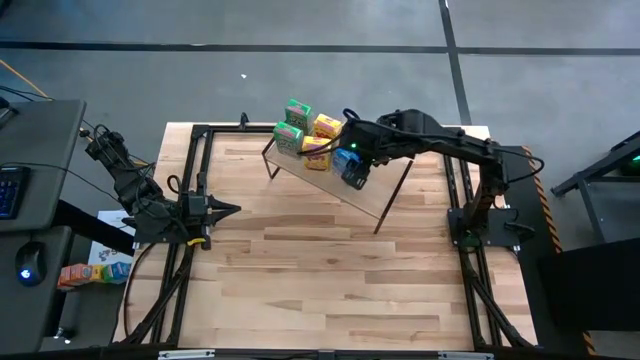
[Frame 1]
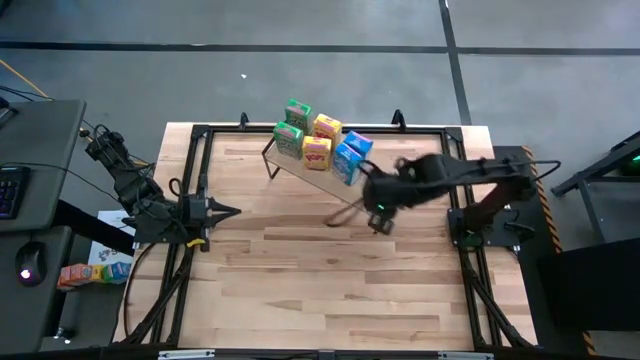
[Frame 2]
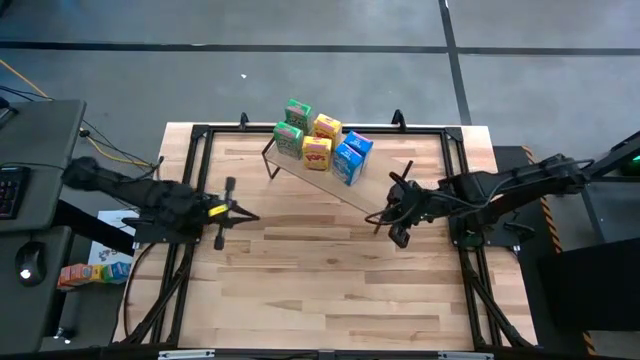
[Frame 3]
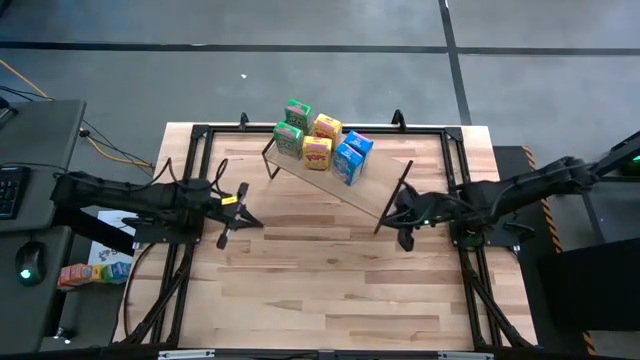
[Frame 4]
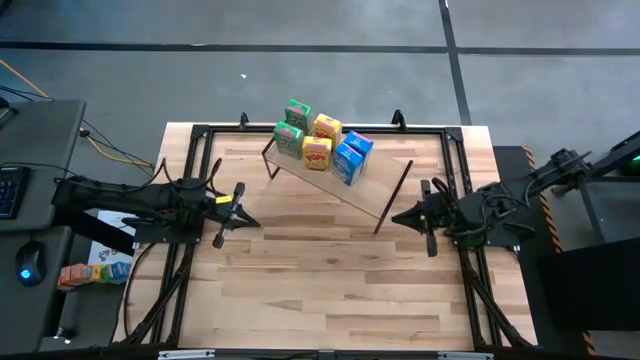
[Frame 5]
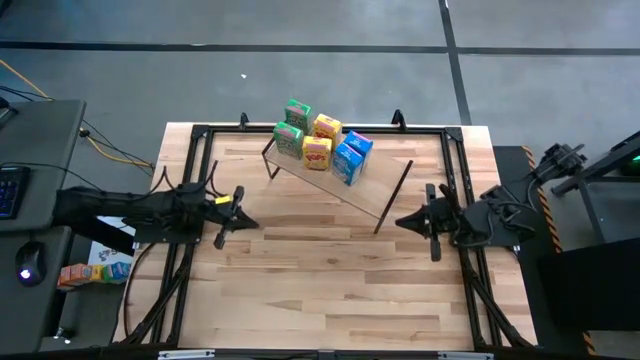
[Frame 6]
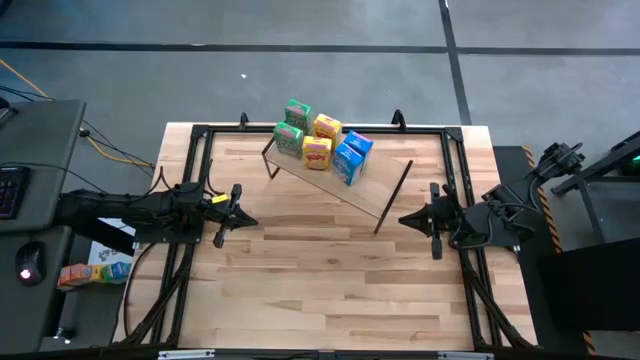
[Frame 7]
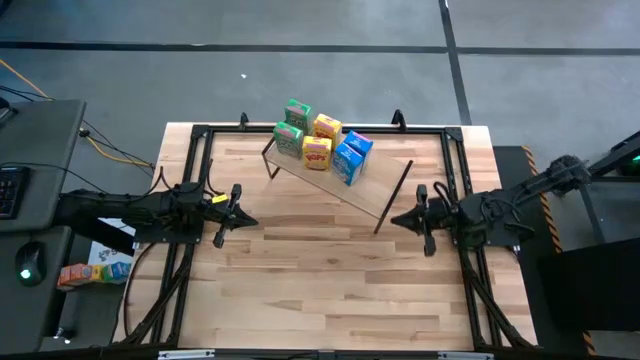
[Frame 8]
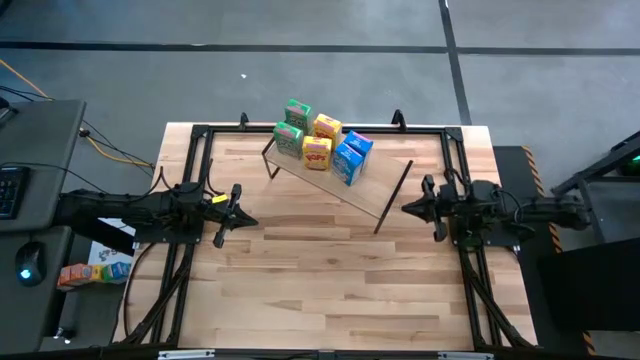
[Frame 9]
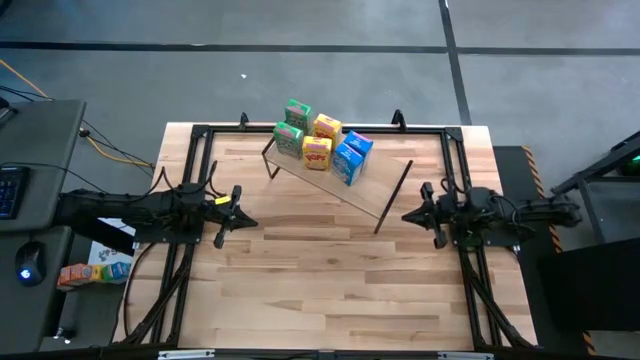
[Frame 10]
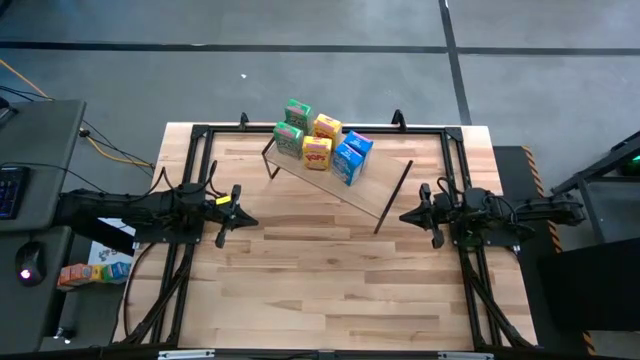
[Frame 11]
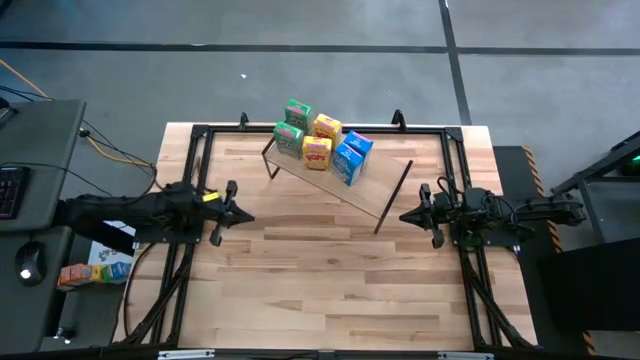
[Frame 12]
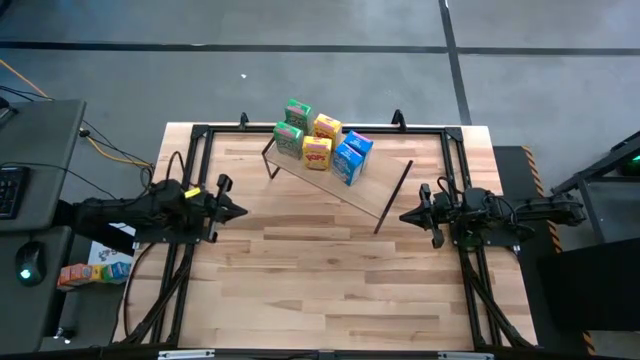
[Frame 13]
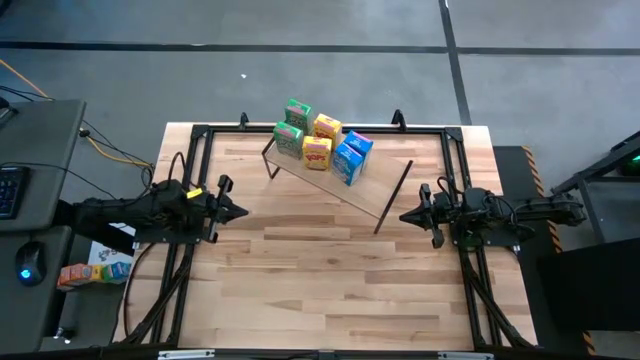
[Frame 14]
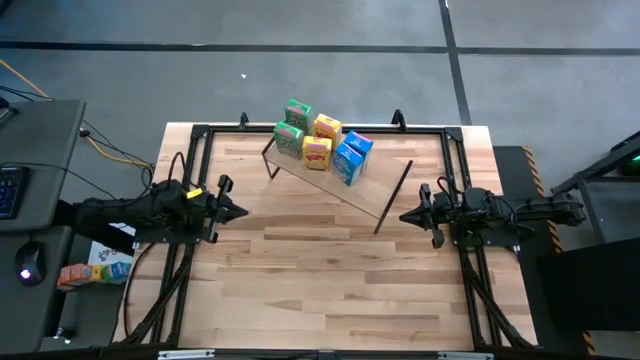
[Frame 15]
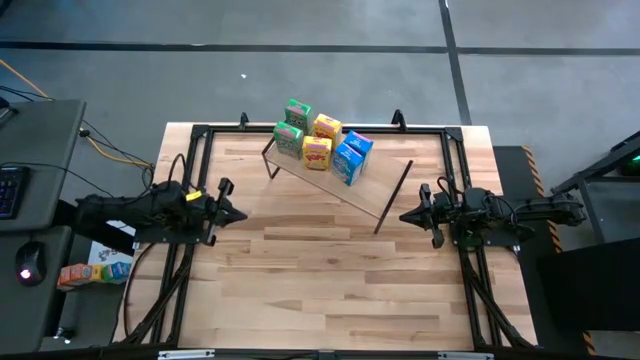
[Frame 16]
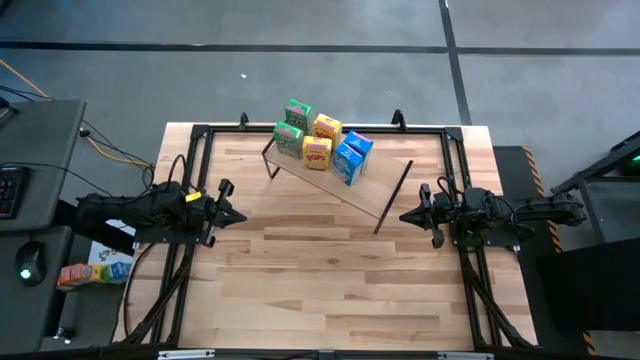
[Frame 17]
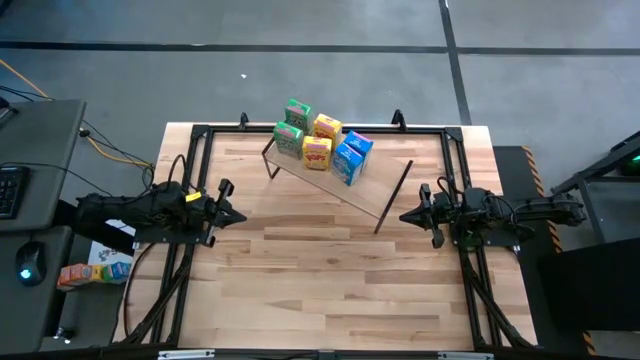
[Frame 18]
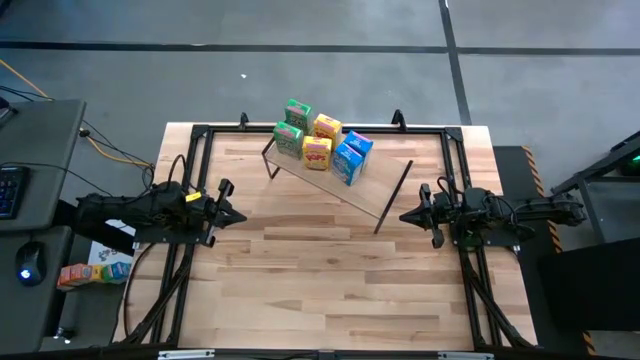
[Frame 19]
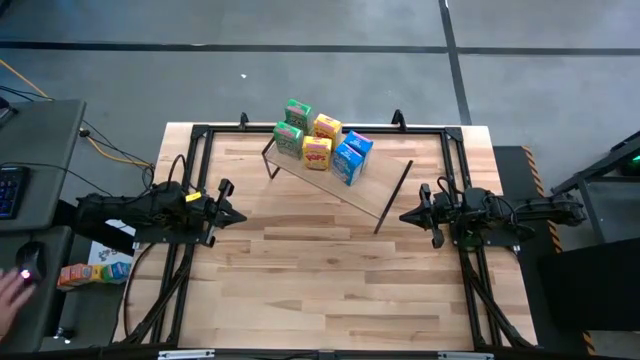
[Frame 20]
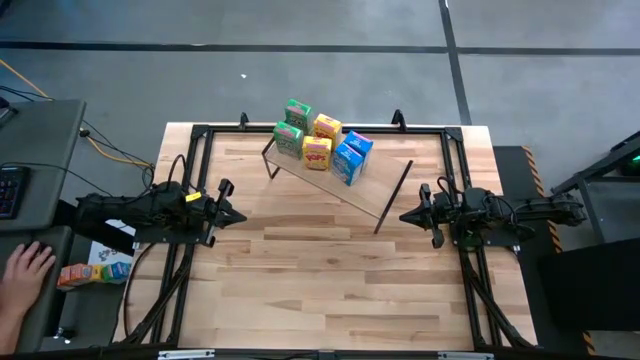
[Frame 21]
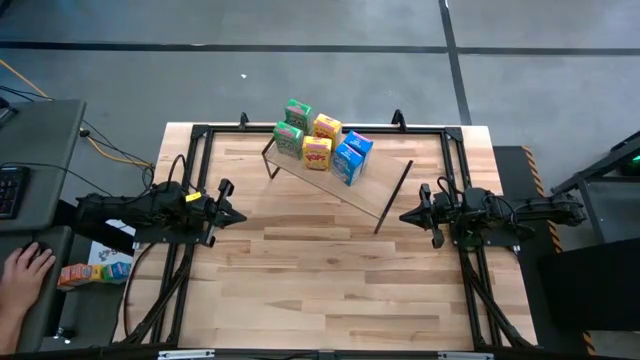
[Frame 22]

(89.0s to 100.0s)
Task: Stack cereal on shelf
Return to Home Position

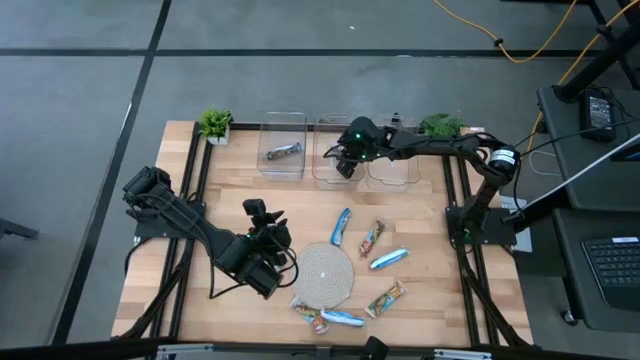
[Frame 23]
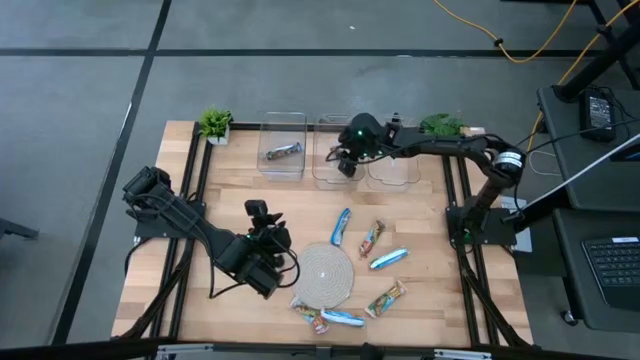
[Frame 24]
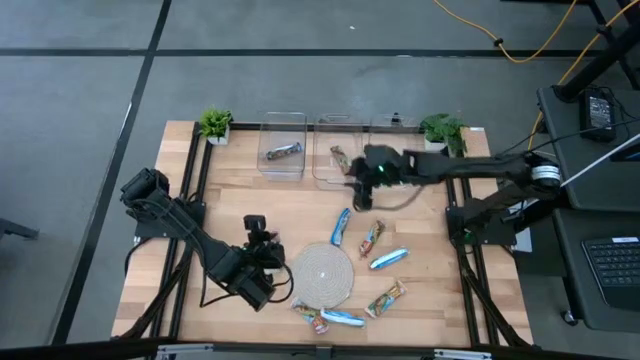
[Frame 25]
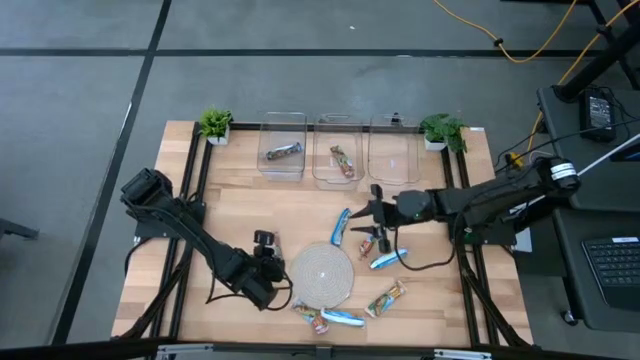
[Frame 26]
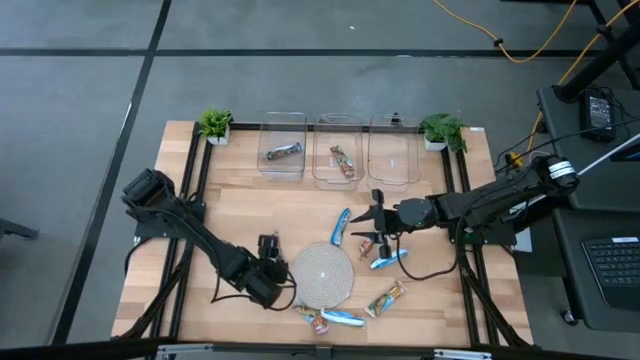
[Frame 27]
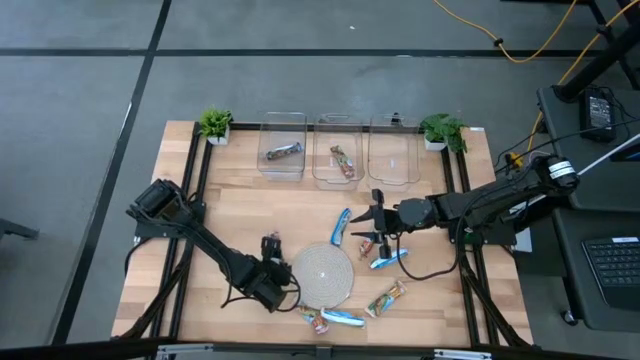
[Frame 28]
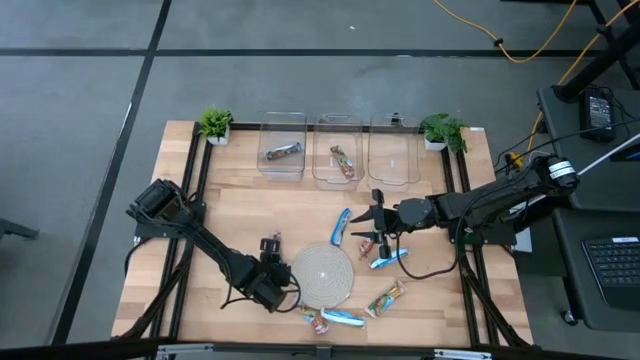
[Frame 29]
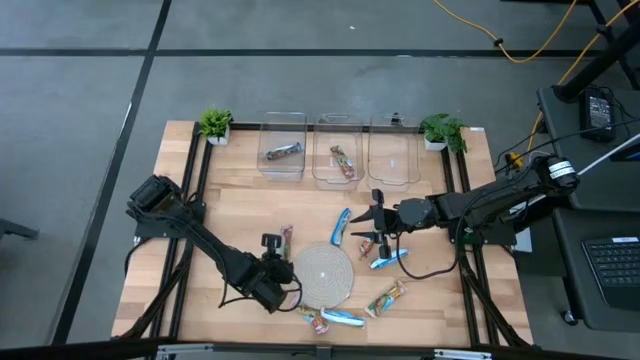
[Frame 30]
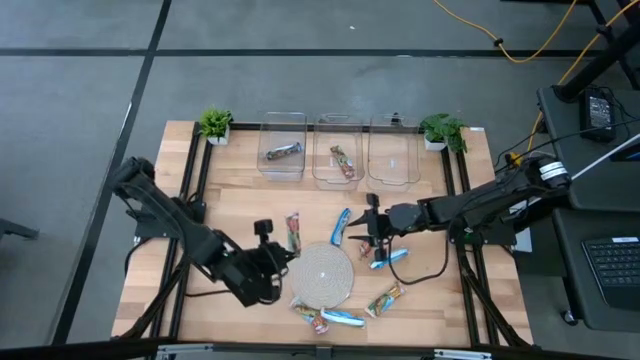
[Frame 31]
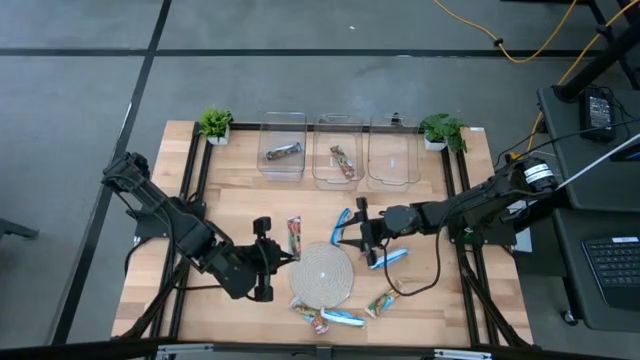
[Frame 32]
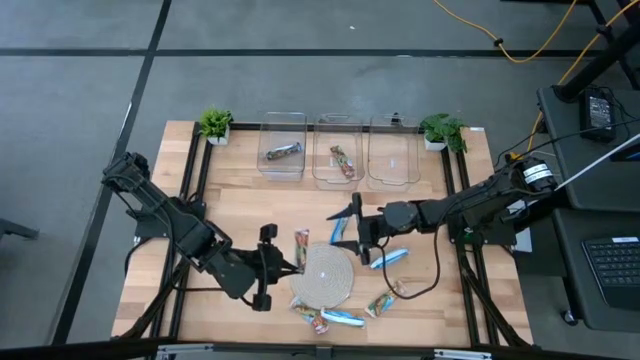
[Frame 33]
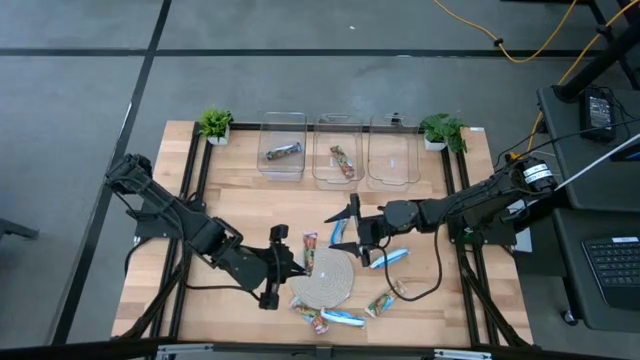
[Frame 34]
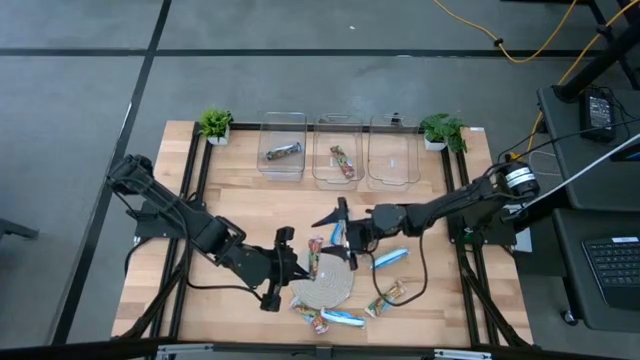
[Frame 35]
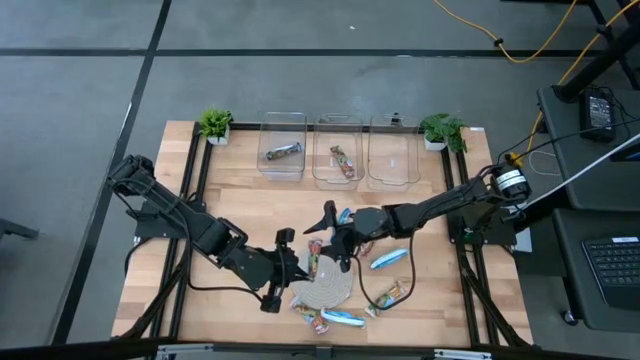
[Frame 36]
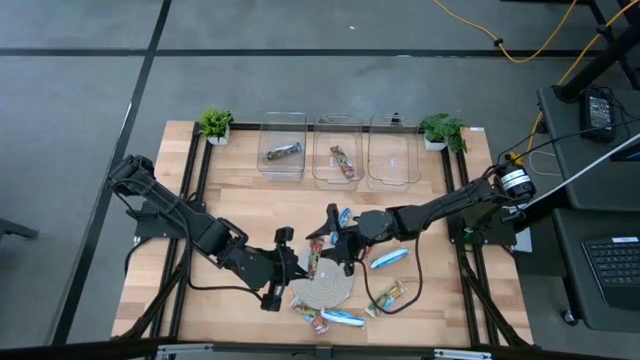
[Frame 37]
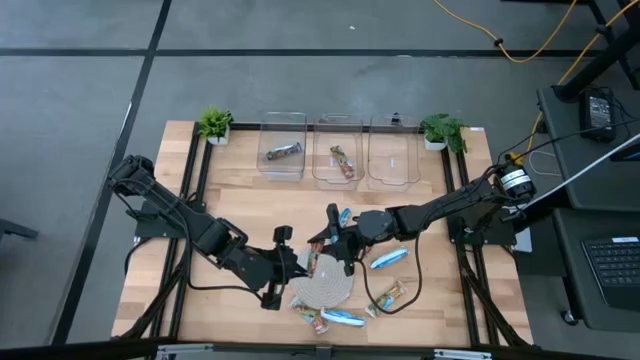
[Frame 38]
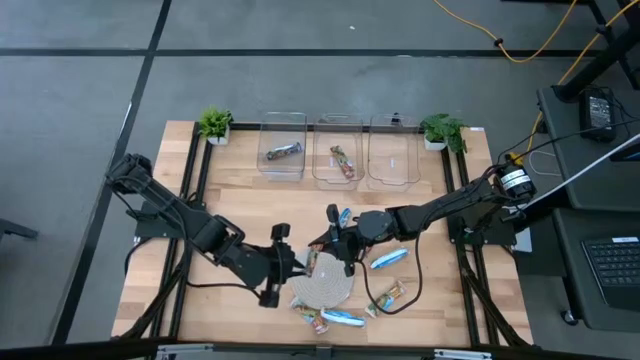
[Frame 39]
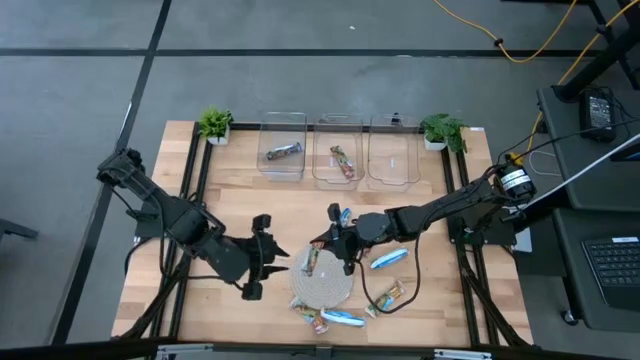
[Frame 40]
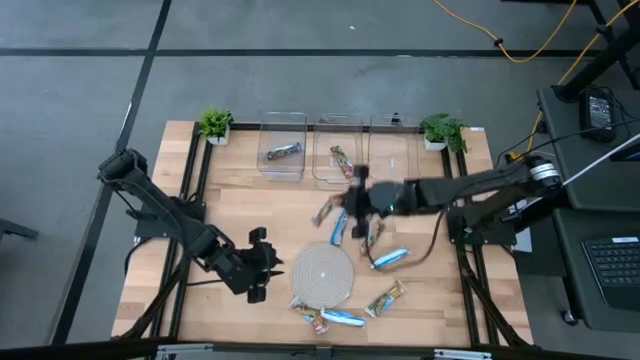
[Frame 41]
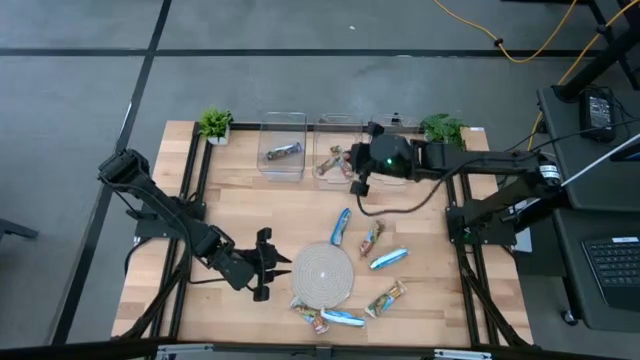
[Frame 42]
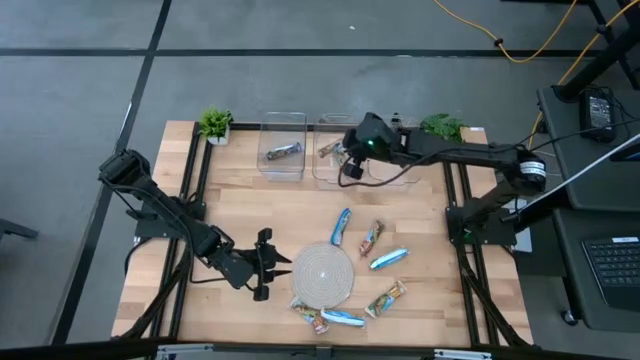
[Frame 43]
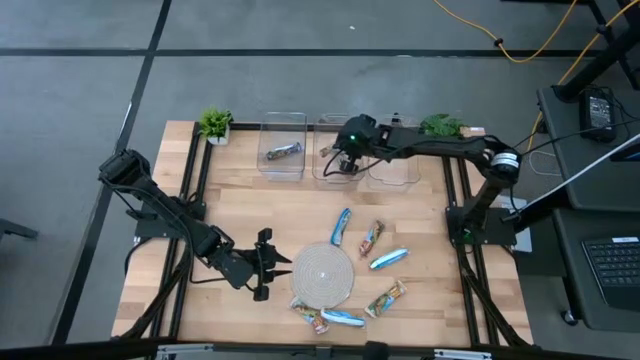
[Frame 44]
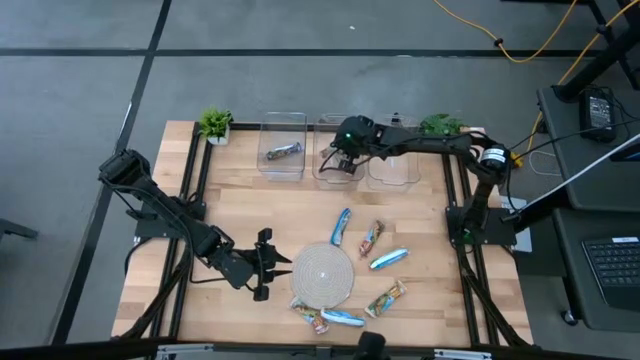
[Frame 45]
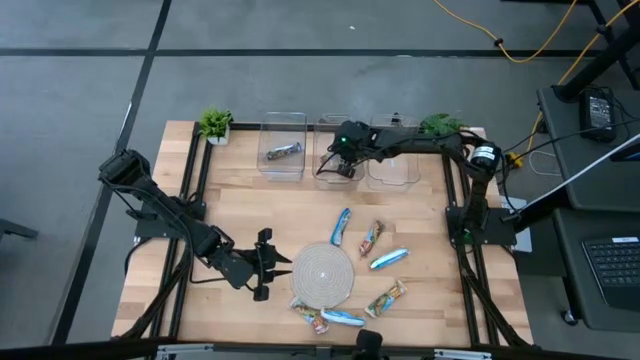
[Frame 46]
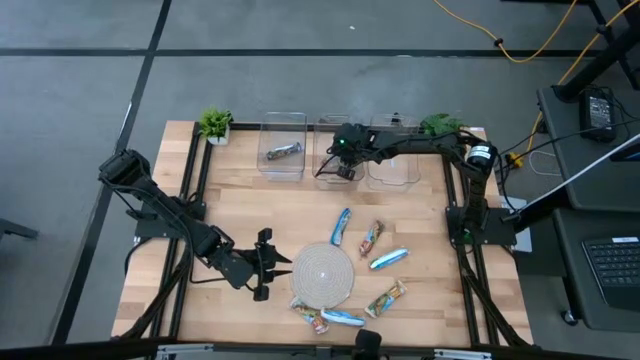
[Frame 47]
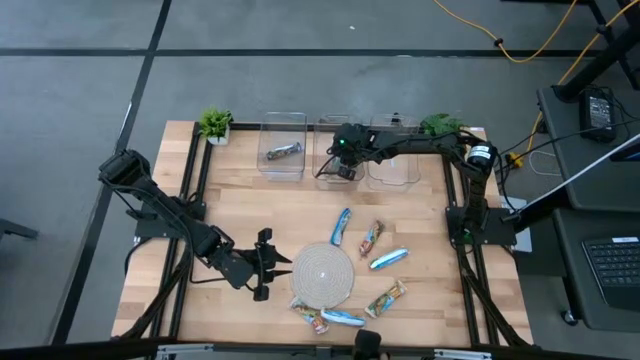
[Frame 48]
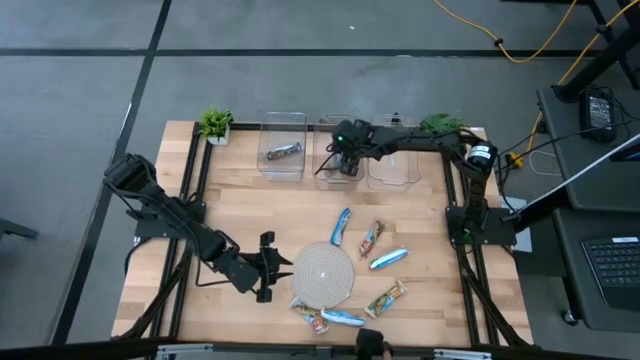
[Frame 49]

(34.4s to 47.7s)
Task: Pick and place Granola Bars by type
Put the red granola bar into the center transparent bin
